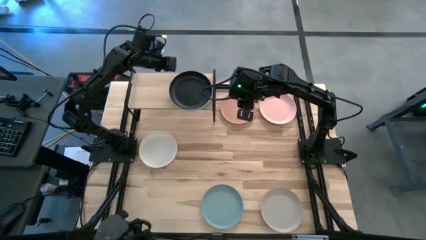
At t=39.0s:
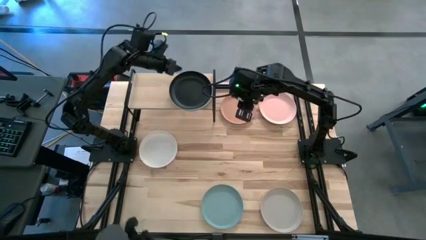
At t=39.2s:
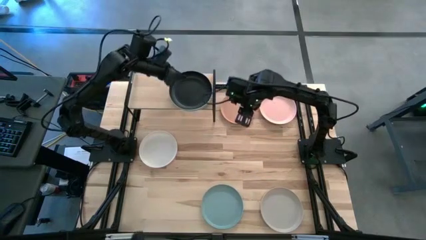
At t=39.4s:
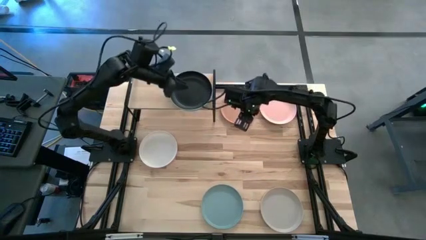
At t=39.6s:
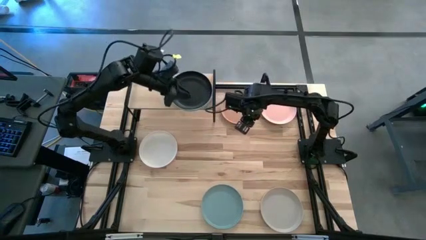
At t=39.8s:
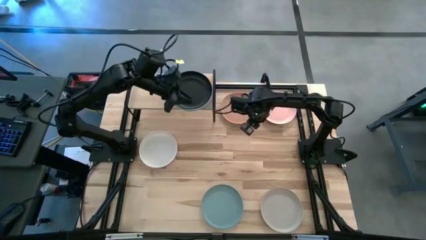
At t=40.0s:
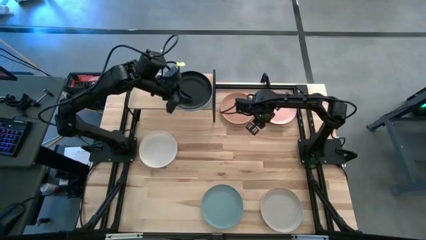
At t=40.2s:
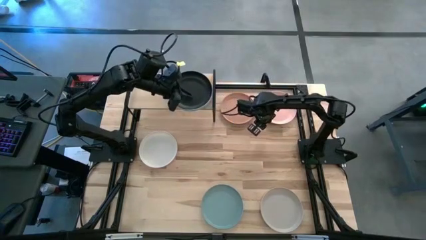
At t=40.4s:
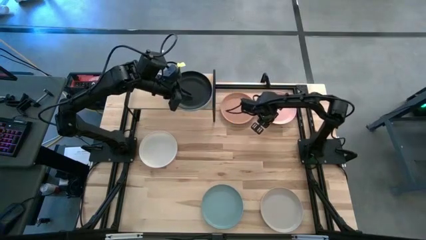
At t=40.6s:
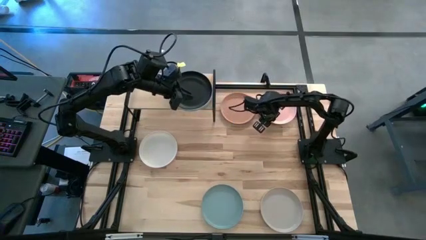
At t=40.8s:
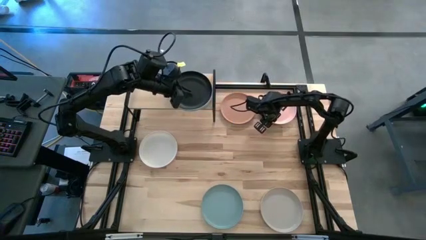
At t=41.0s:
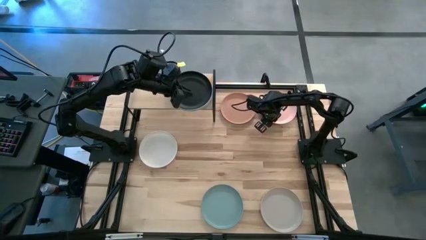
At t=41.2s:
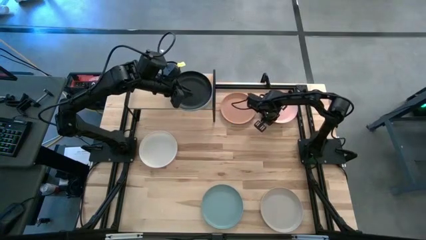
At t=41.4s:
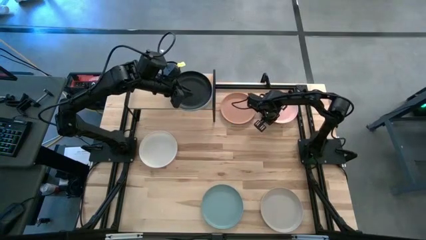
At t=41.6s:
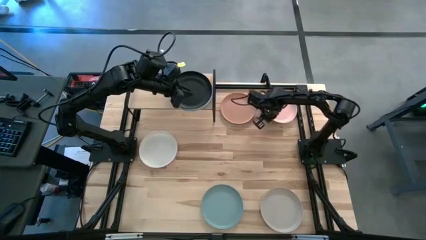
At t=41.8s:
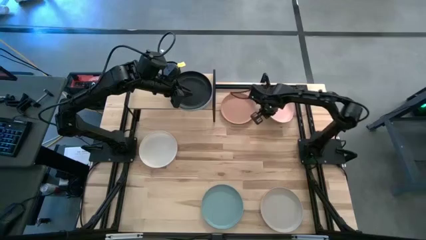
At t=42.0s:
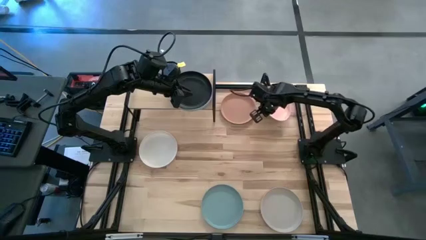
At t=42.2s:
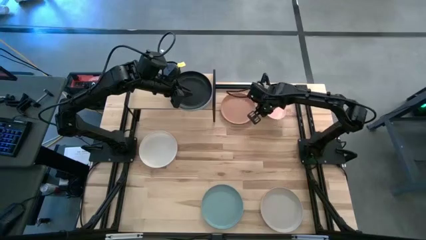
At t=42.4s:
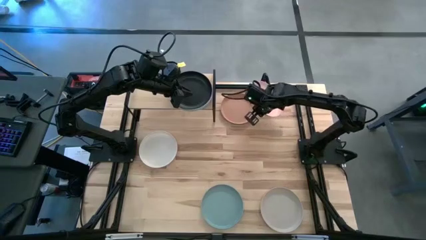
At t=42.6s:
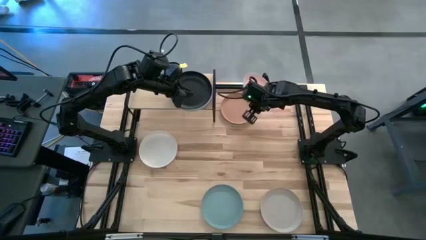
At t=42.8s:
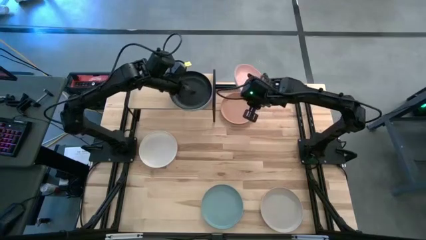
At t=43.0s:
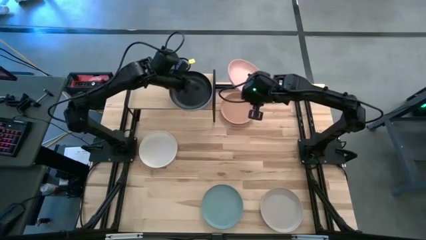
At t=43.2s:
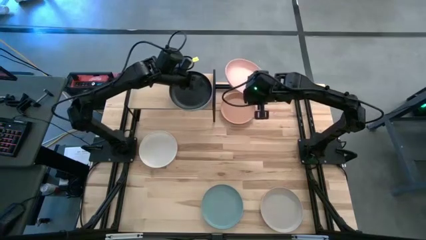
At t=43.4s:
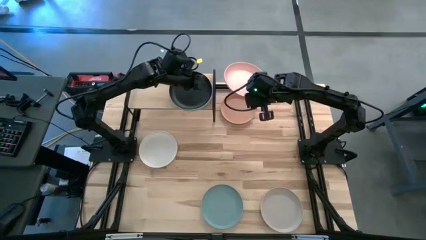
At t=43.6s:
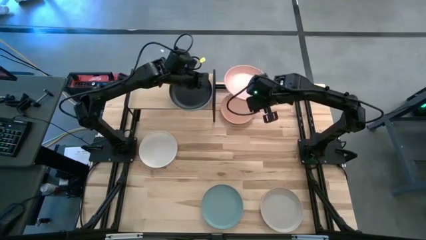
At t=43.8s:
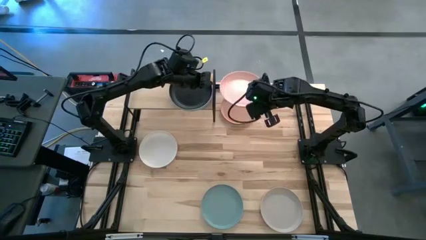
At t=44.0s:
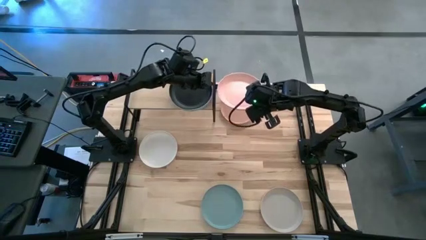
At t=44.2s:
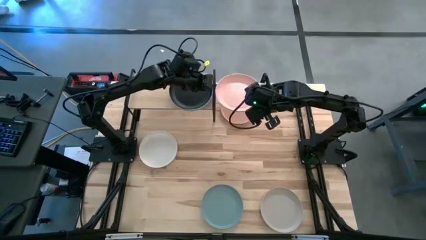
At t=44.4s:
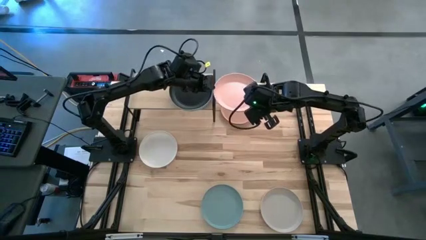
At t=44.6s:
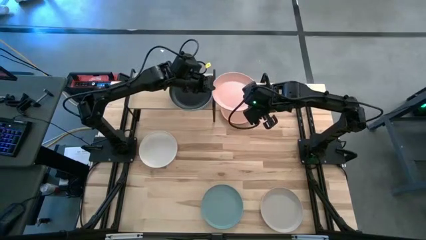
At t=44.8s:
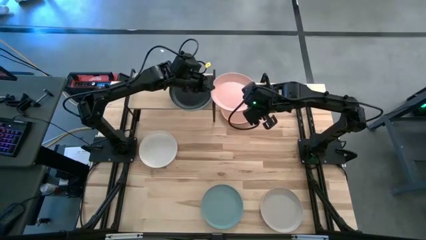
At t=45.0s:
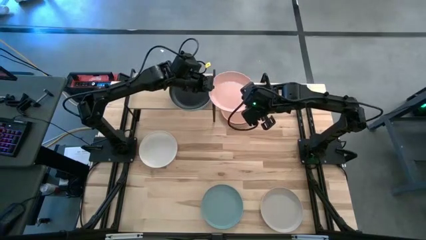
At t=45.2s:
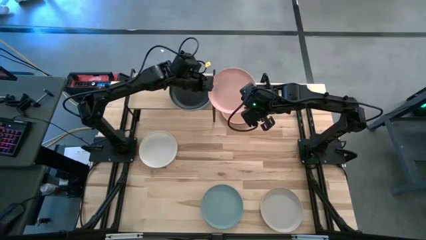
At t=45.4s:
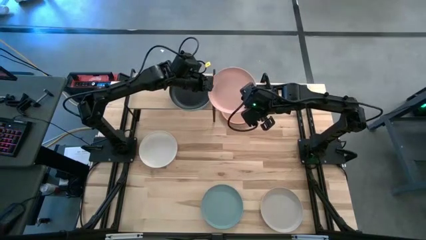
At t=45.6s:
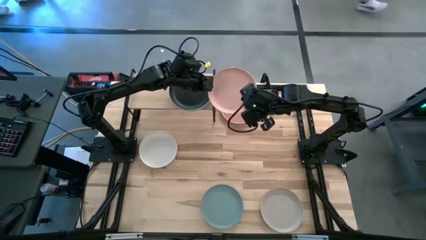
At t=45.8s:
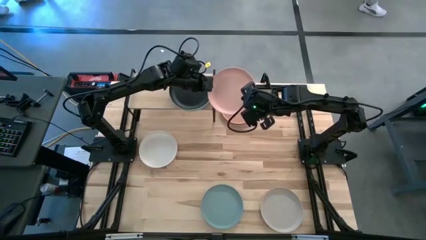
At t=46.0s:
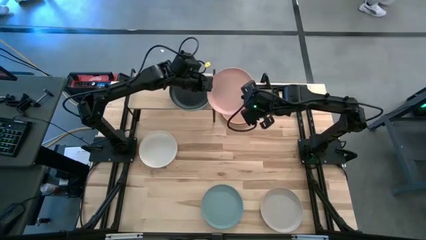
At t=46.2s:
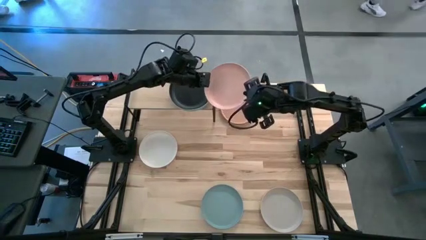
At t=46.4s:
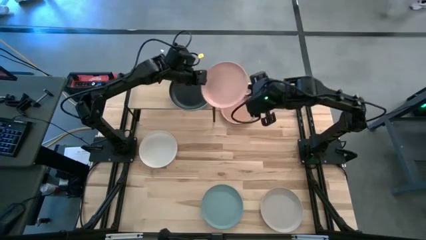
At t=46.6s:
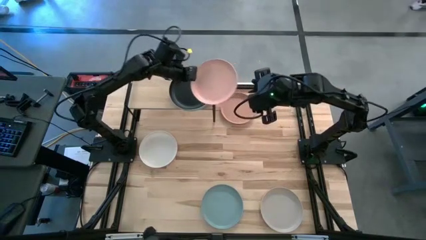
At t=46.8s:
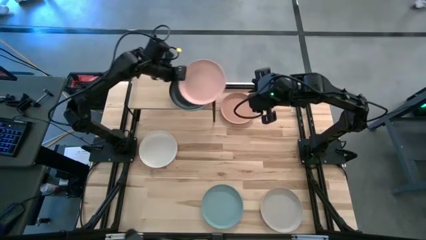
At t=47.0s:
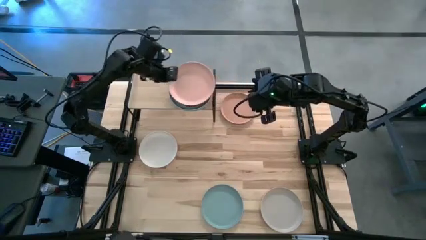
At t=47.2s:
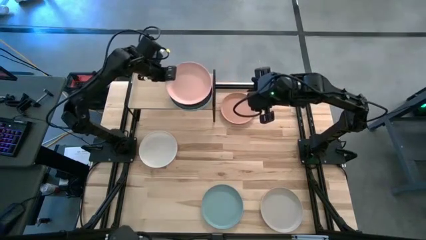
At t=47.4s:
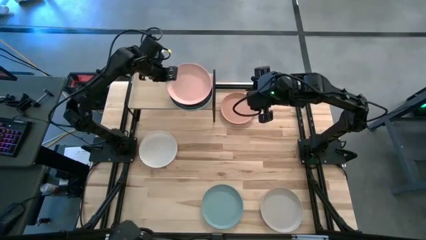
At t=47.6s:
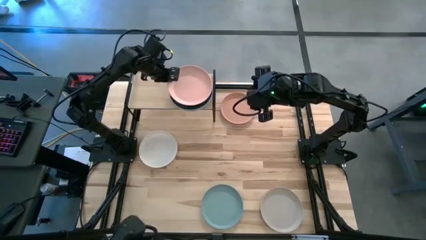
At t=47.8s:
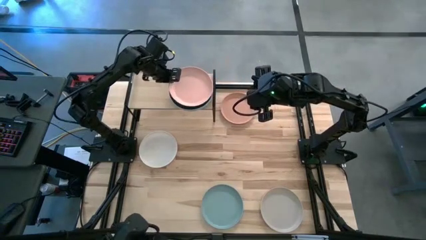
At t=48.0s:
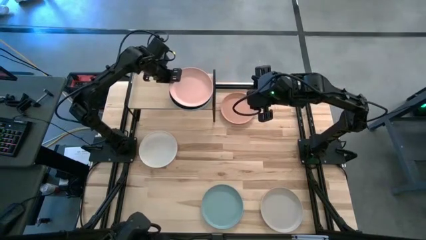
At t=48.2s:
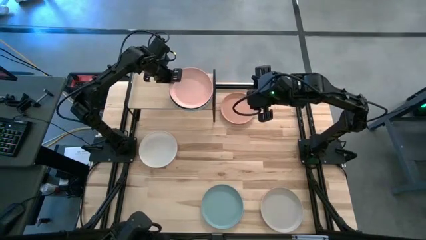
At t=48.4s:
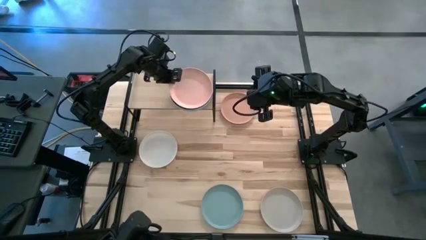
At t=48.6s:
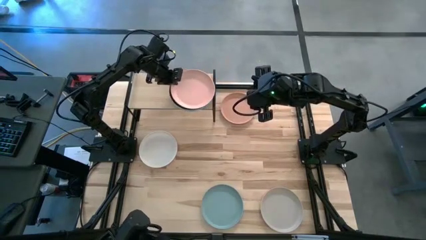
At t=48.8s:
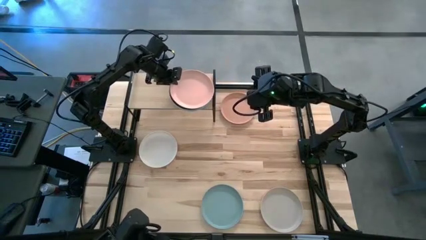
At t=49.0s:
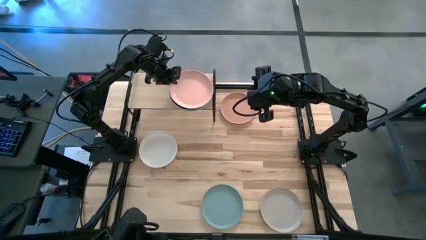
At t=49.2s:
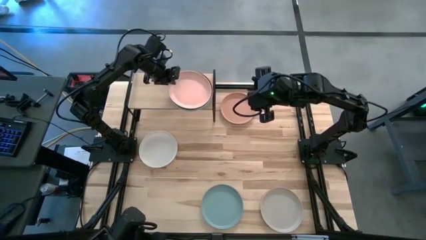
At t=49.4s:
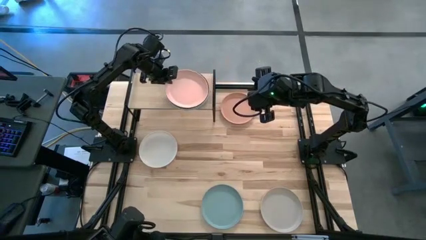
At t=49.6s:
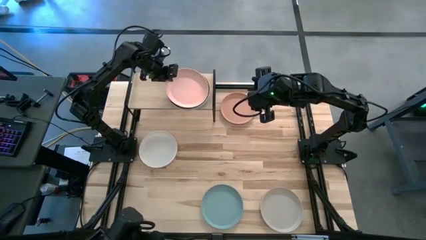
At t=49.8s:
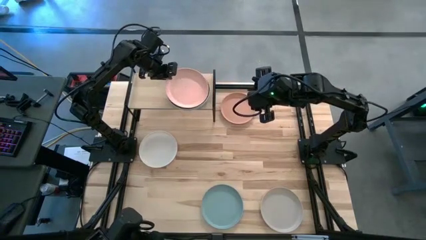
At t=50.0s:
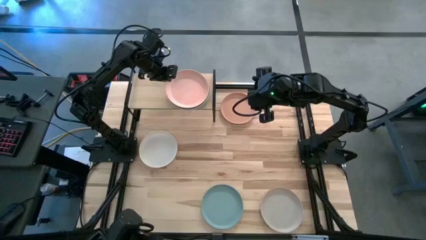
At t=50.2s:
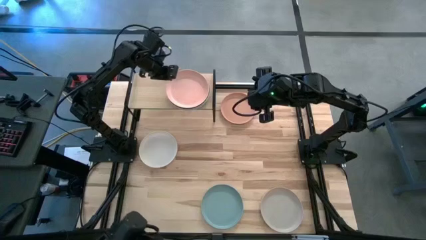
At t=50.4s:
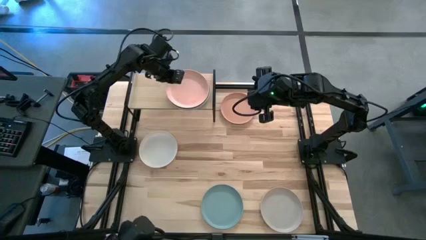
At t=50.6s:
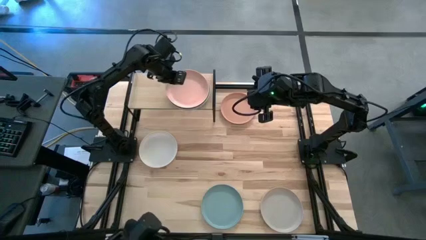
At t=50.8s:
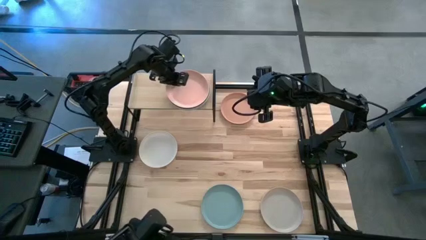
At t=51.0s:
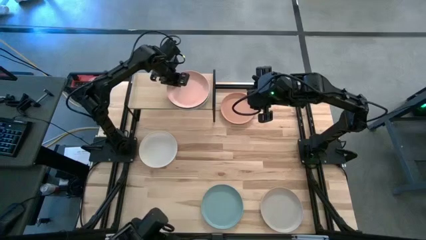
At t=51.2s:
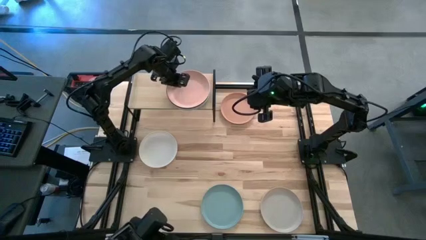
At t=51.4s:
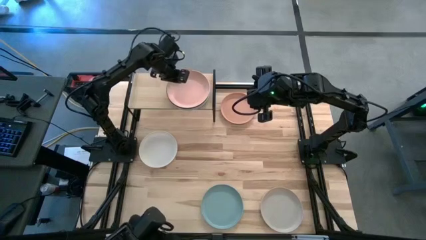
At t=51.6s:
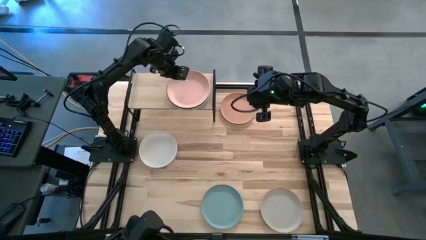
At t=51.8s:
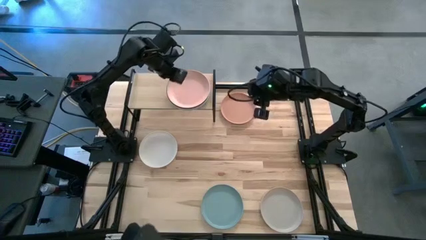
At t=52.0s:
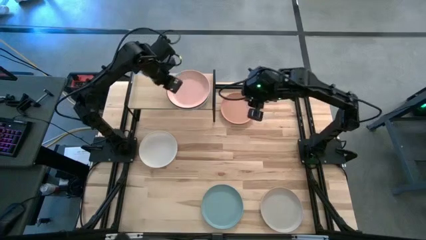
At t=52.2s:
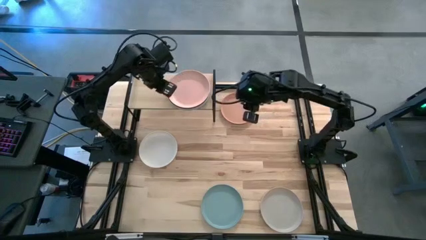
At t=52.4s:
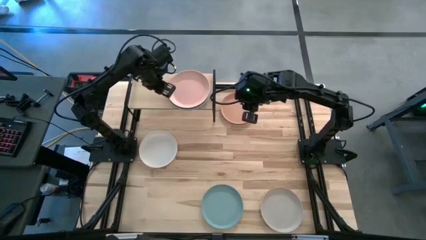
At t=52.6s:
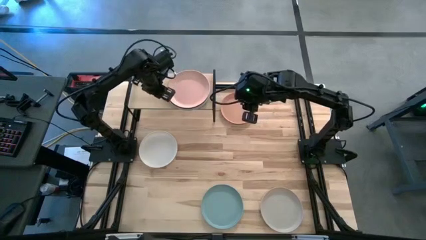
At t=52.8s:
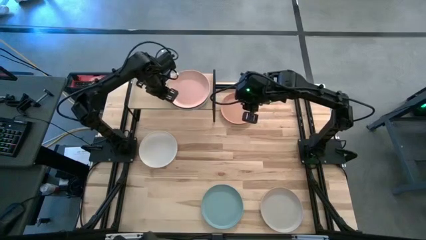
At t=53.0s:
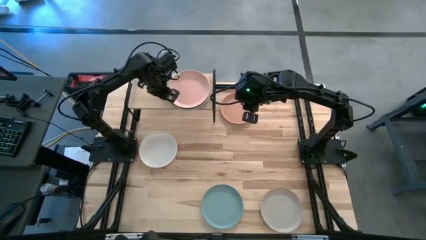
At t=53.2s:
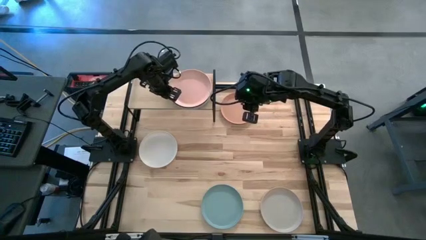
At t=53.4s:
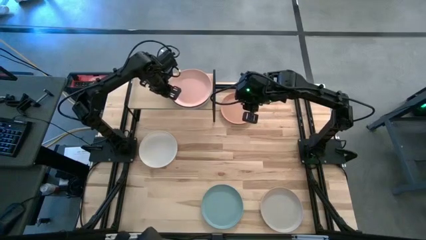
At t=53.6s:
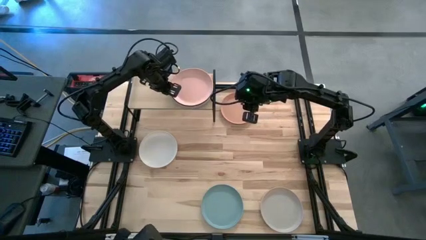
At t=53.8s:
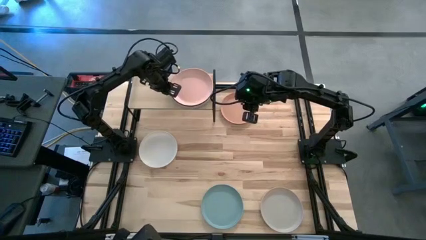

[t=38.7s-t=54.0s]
Task: Place and stack plates onto a shelf
Stack the light orange plate on top of the black plate on the shelf

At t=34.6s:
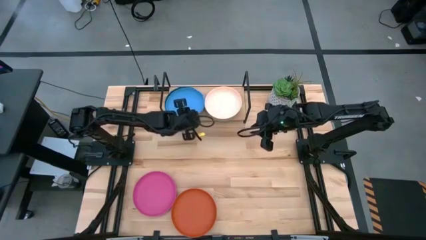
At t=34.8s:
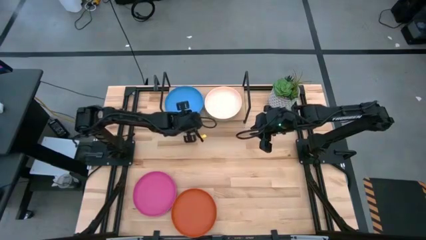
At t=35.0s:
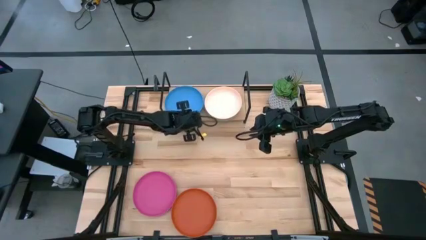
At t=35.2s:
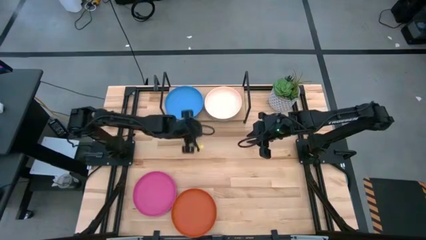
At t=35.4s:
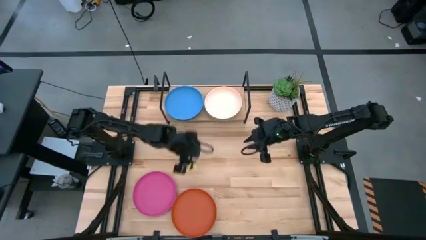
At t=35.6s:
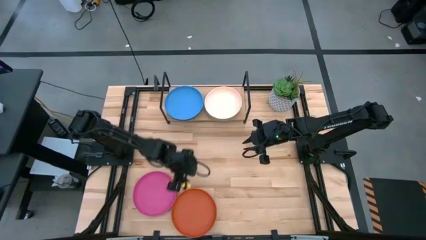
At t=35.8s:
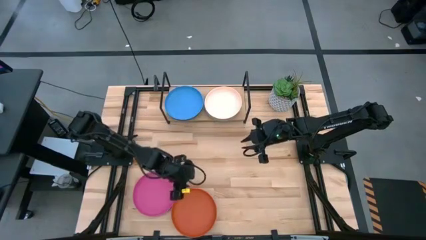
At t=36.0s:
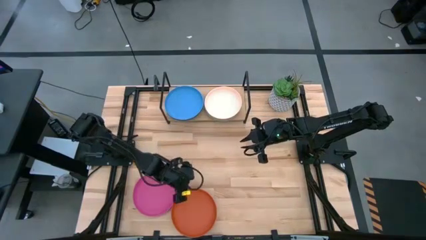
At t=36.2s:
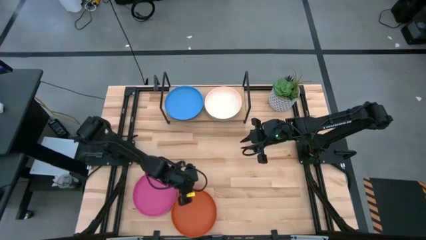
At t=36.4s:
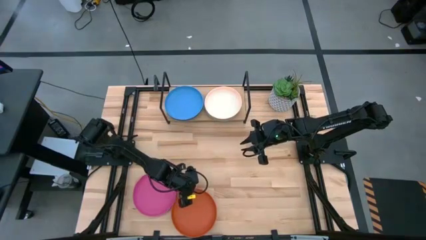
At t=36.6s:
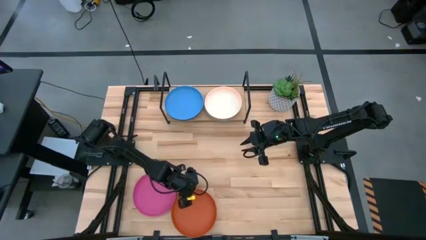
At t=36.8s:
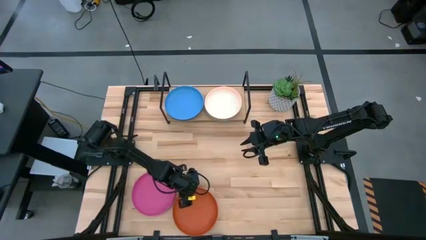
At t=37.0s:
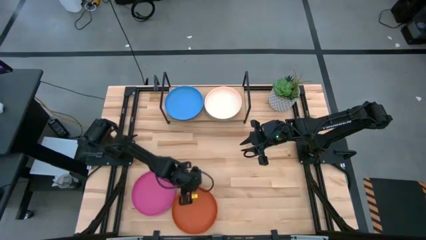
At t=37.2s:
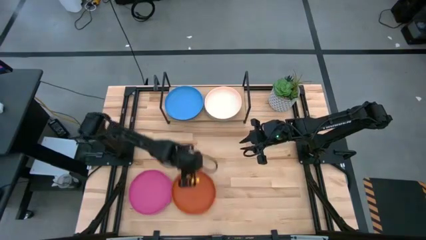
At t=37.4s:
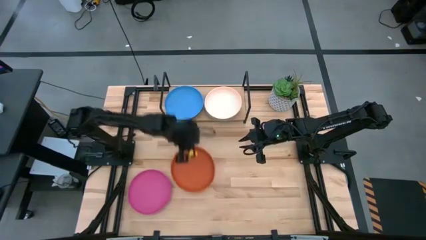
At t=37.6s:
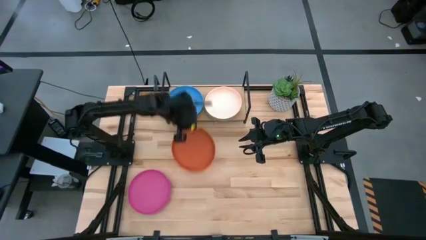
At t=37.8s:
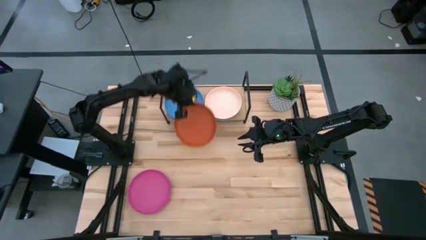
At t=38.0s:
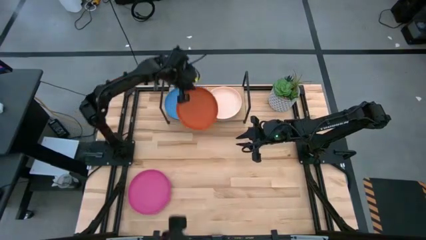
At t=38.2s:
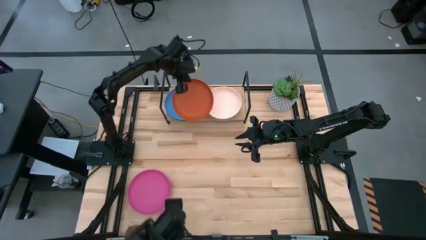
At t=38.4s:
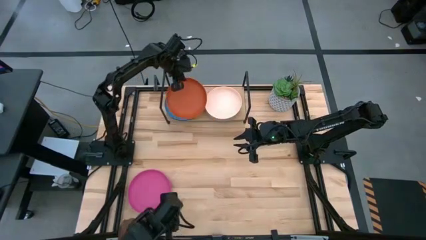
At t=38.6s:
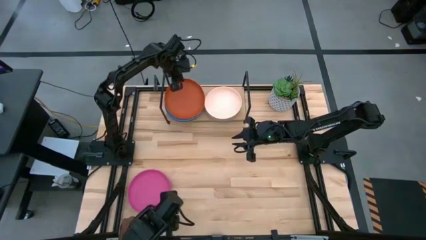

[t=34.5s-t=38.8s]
Task: Place and stack plates onto a shelf
Stack the orange plate on top of the stacked plates on the shelf
